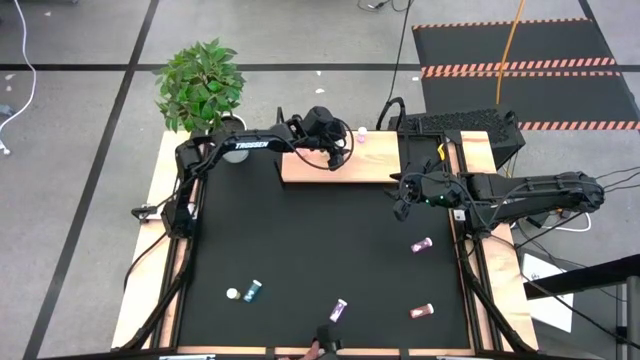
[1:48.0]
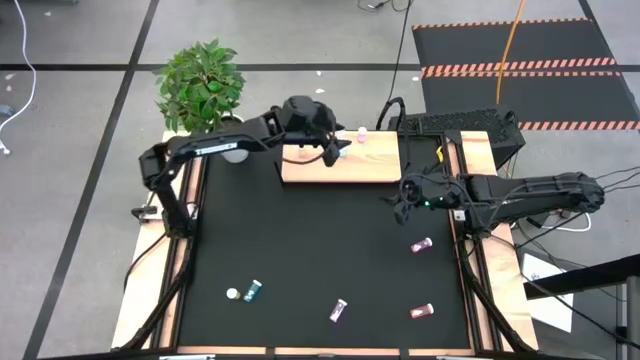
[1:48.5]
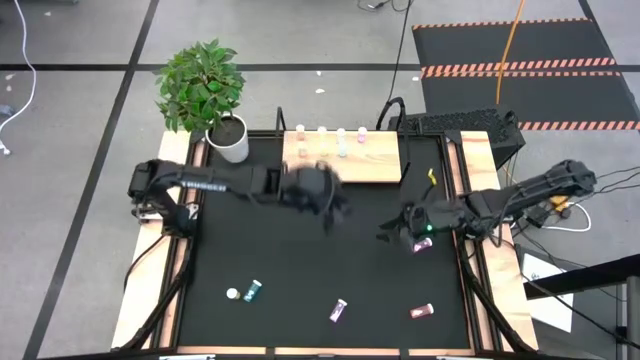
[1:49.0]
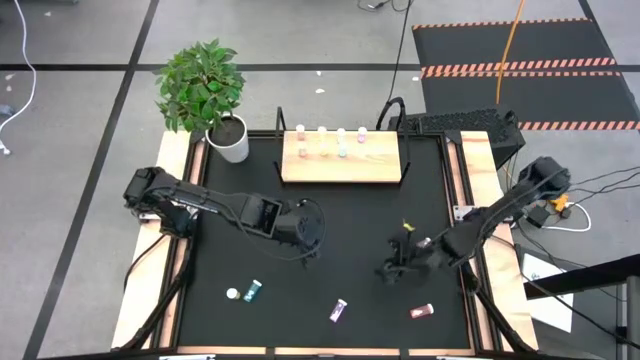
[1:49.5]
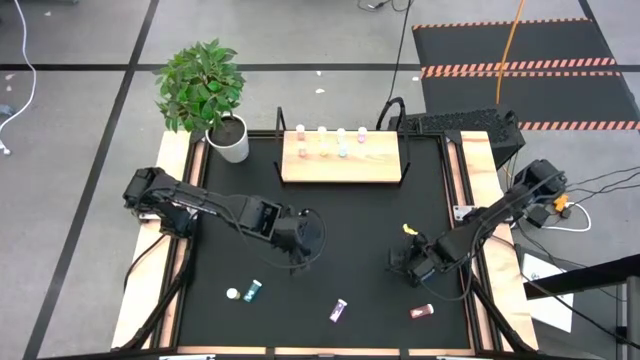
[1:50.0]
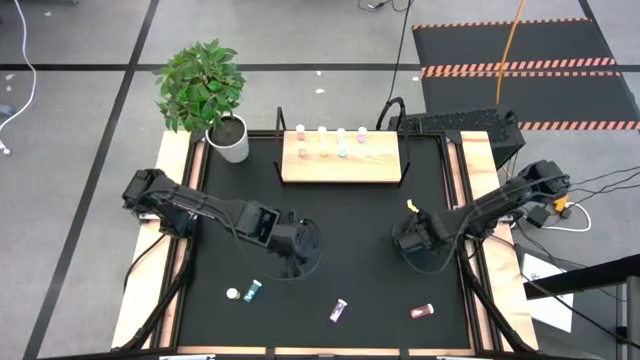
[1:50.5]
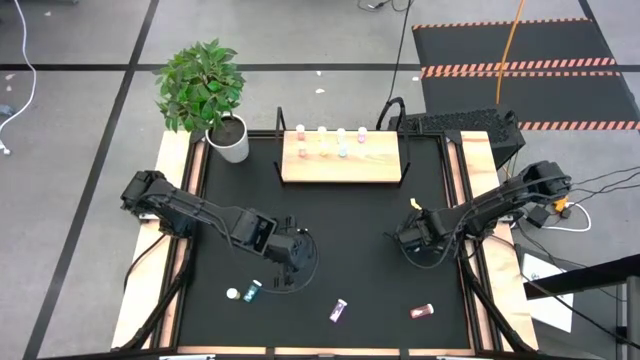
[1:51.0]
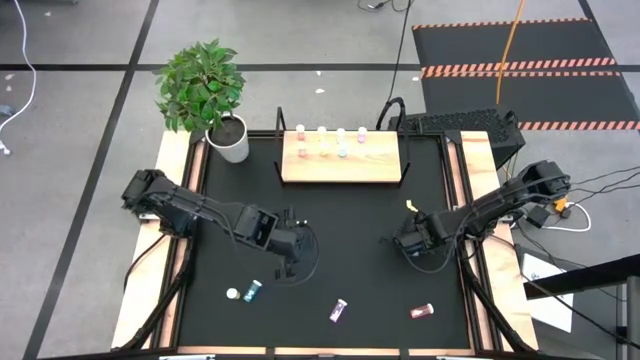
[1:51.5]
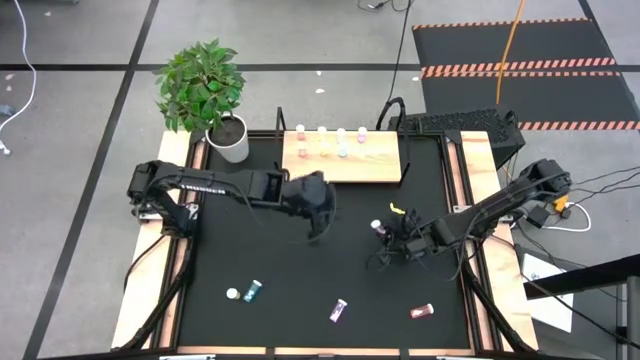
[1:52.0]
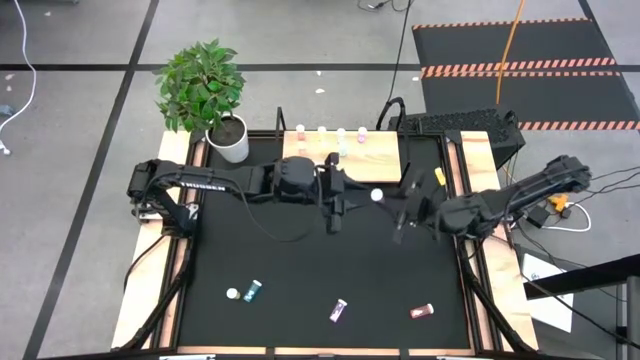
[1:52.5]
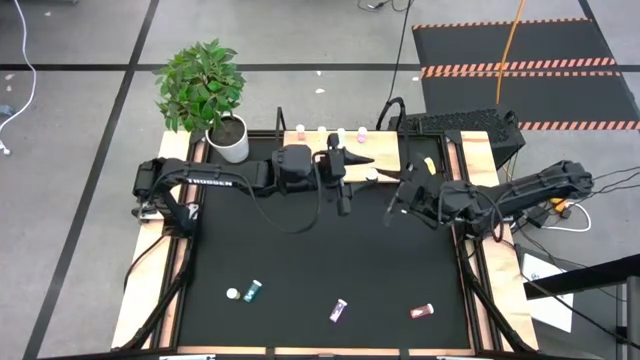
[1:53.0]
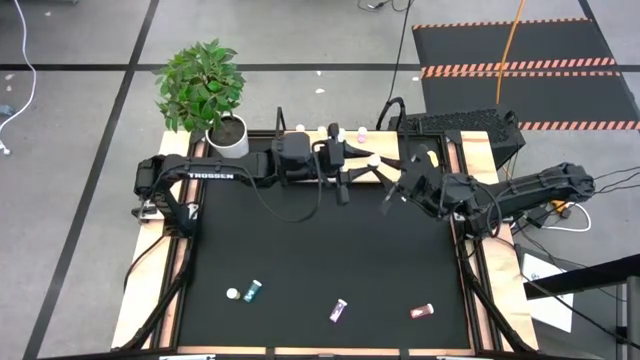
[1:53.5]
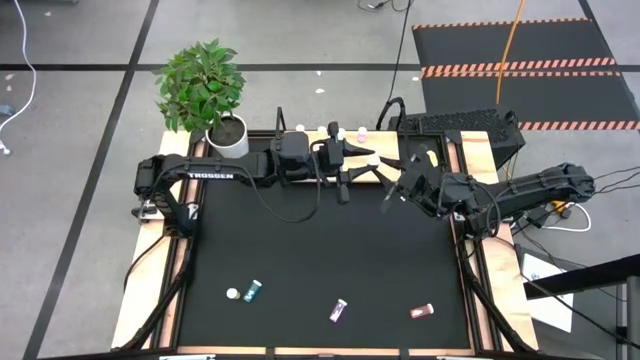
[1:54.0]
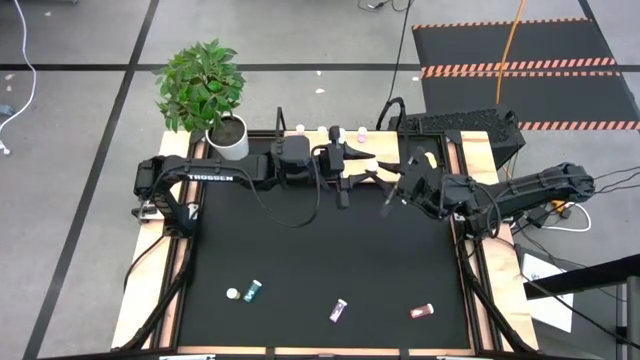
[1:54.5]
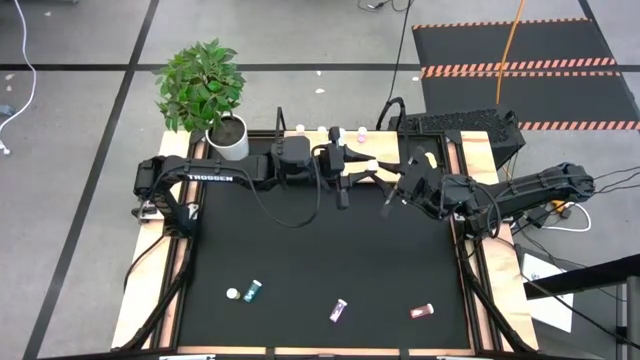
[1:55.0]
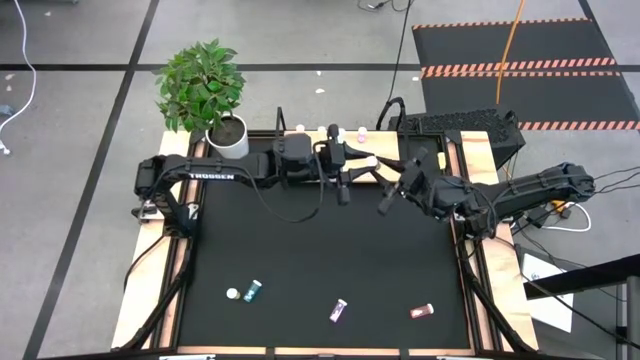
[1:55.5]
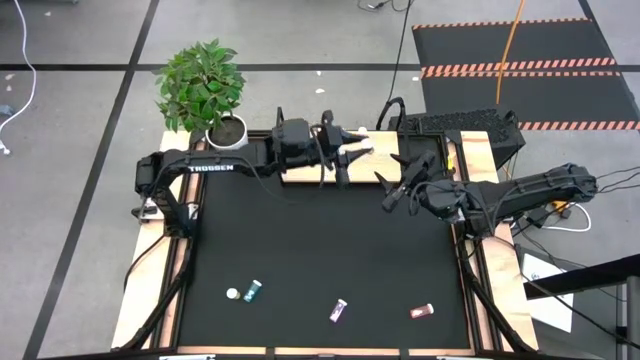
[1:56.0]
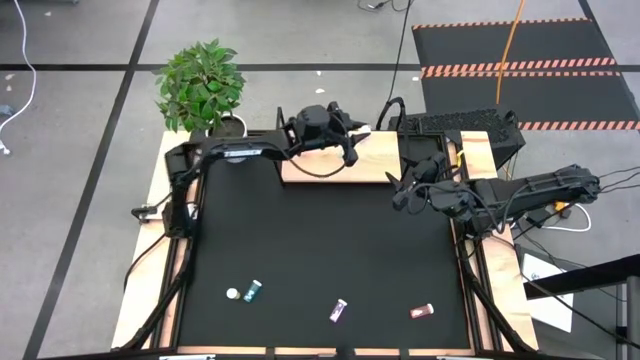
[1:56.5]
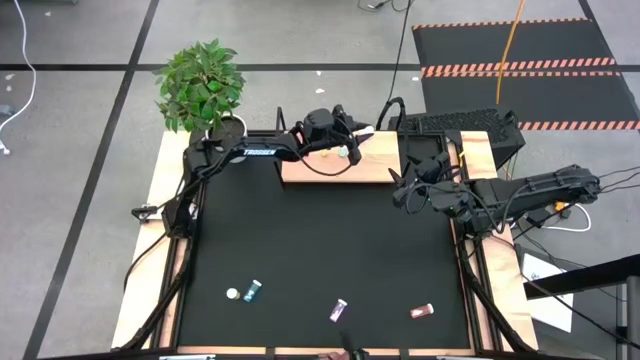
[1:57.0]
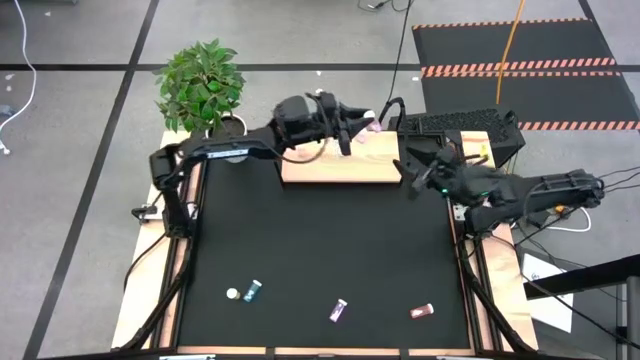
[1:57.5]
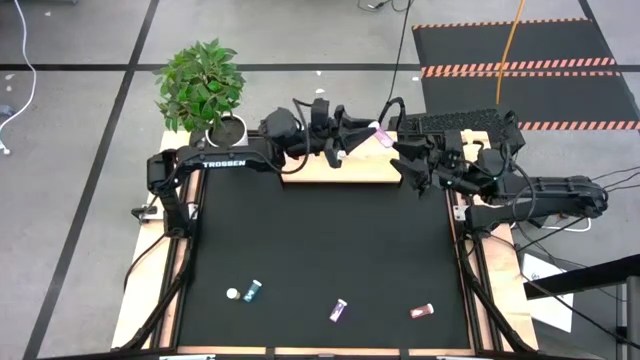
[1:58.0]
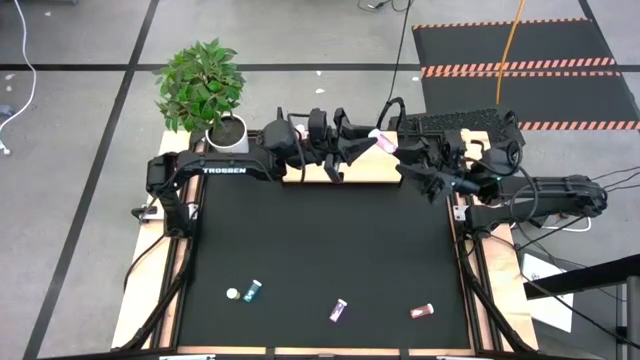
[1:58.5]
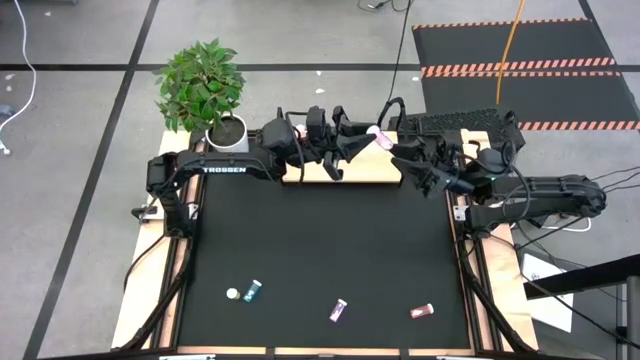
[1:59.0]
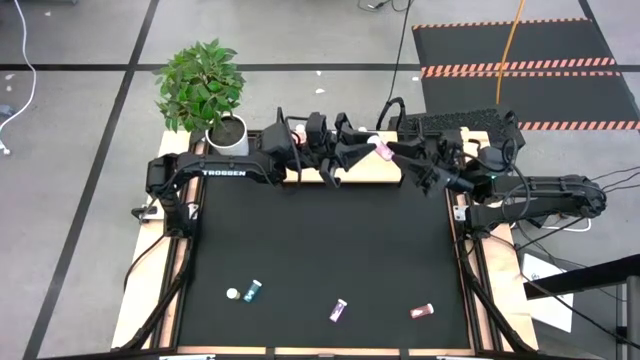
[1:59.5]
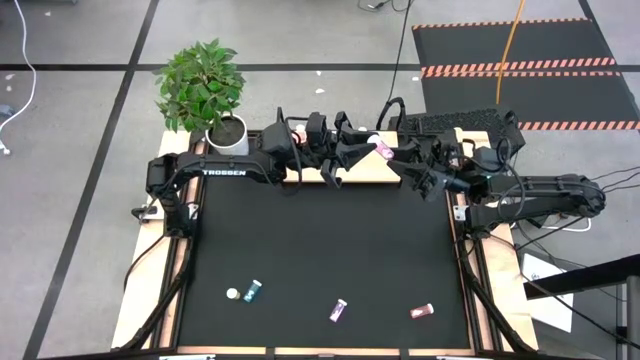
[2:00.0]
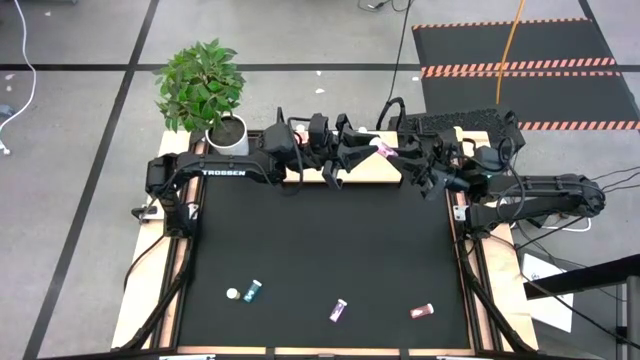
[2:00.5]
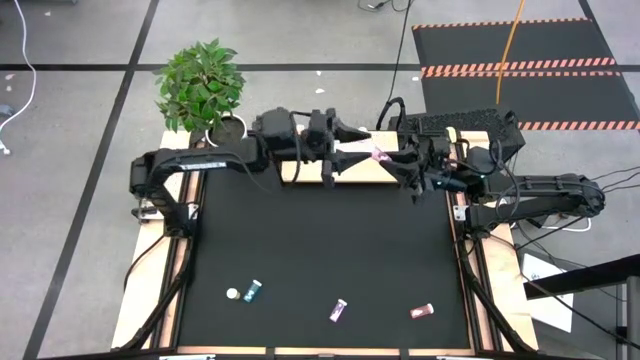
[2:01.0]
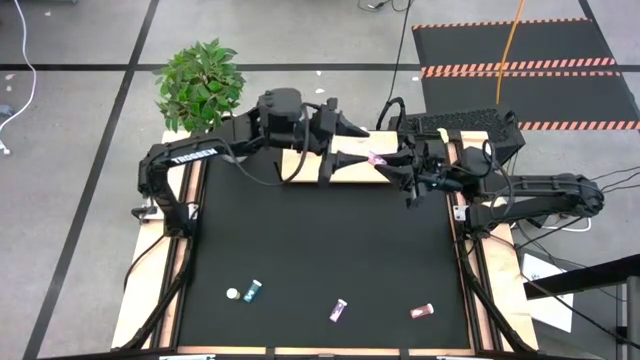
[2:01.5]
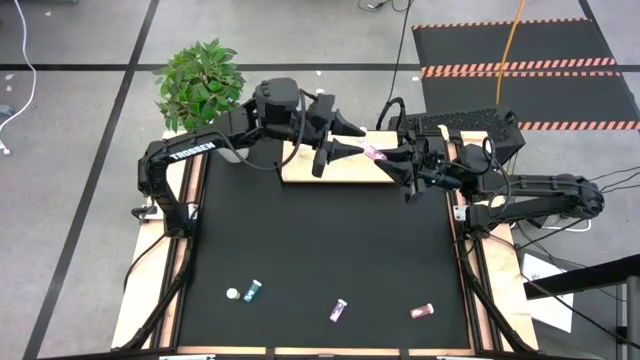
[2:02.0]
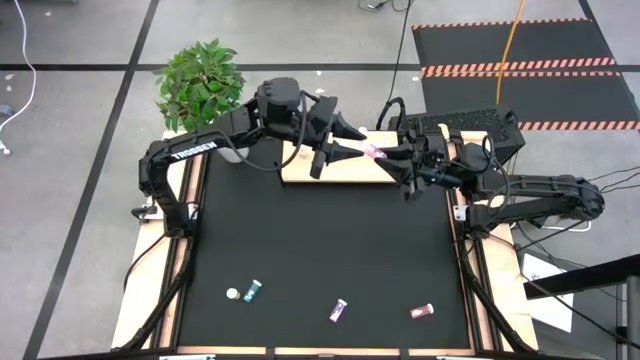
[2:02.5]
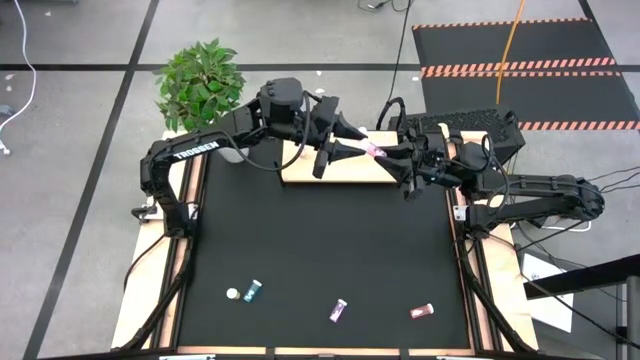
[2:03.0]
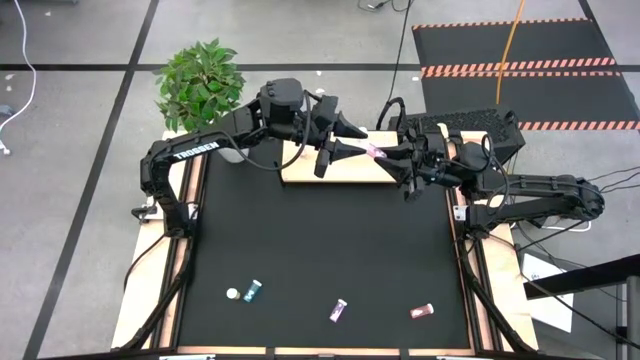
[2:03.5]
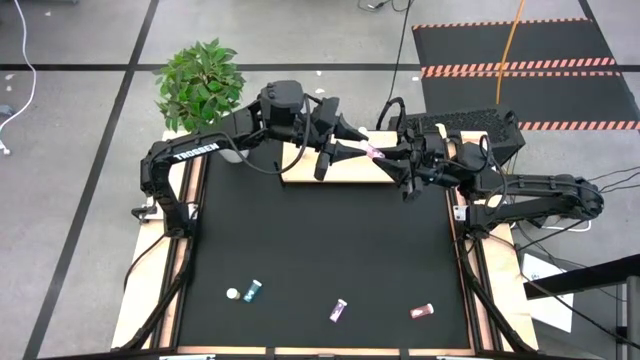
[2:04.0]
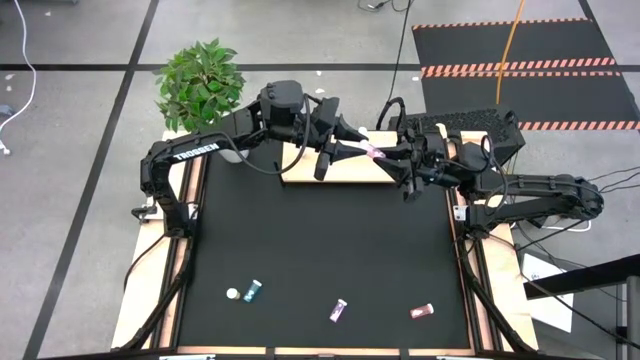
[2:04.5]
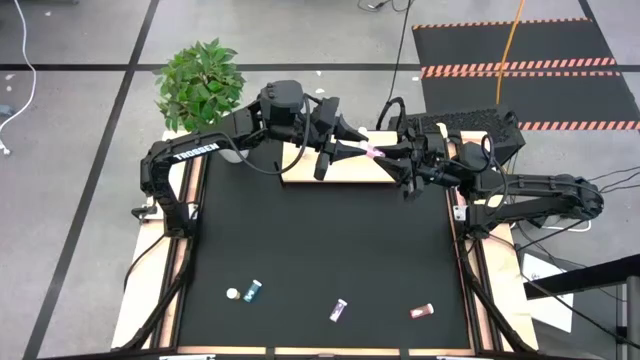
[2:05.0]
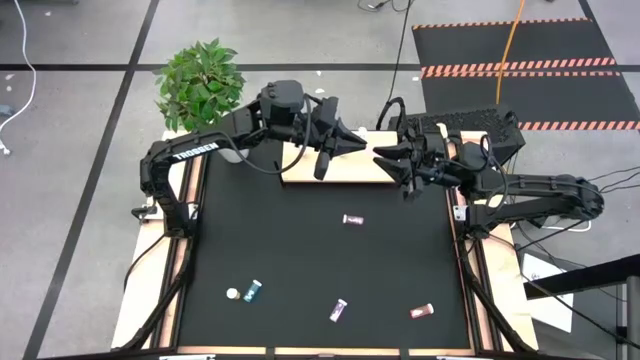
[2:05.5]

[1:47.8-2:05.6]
Task: Pick and place medicine bottles onto shelf by color
Put the right violet pill bottle on the shelf aligned with the other violet pill bottle

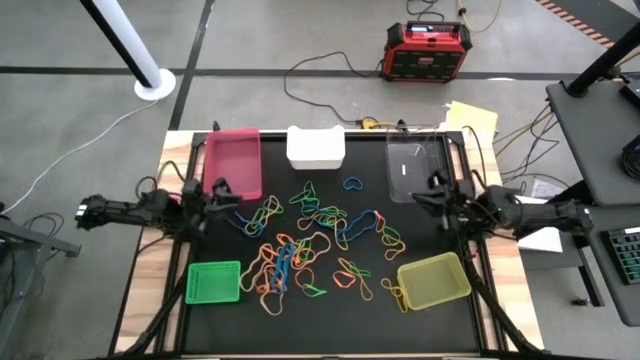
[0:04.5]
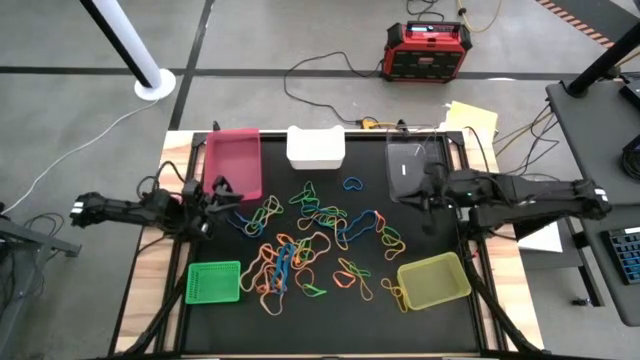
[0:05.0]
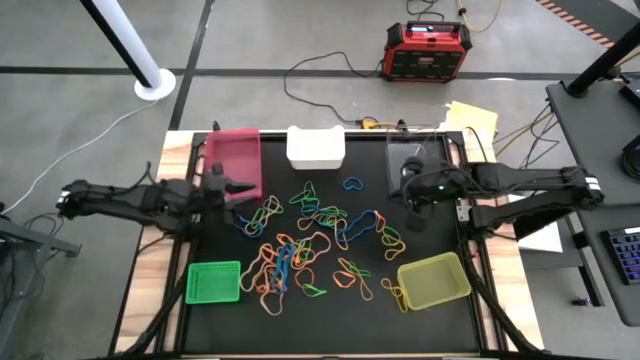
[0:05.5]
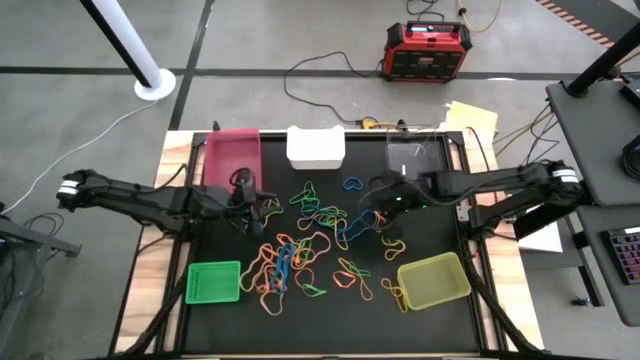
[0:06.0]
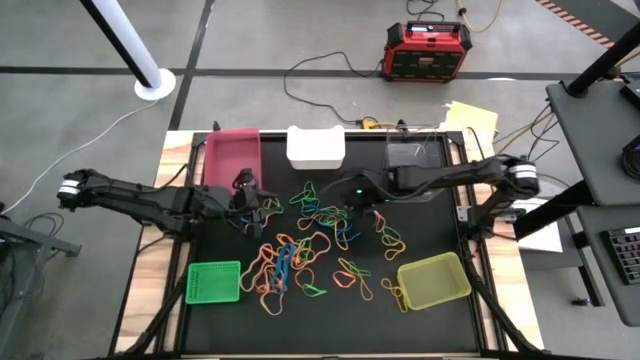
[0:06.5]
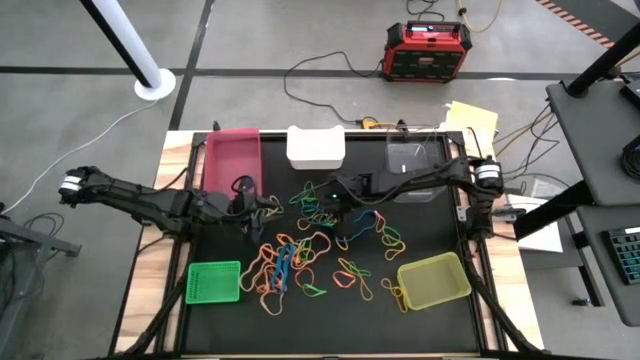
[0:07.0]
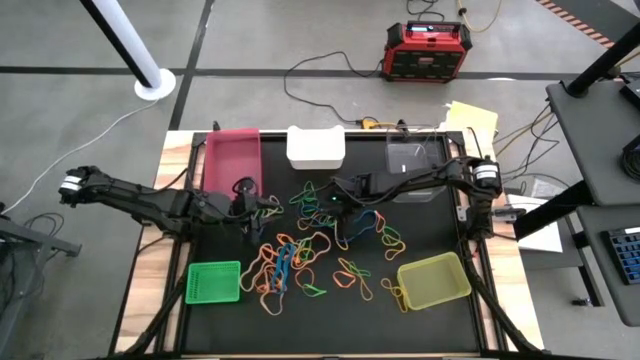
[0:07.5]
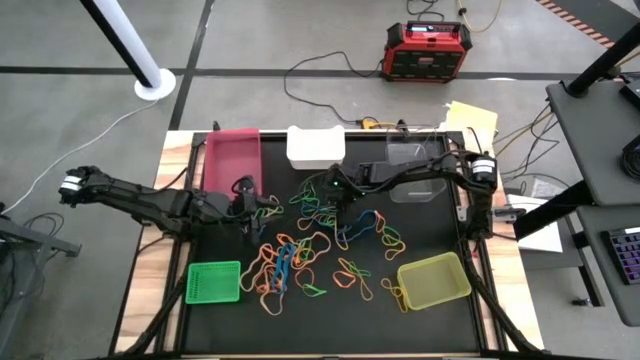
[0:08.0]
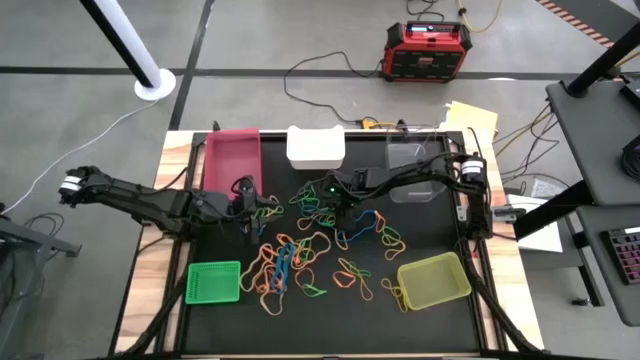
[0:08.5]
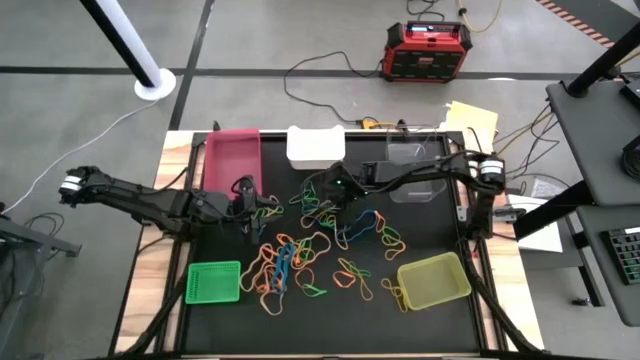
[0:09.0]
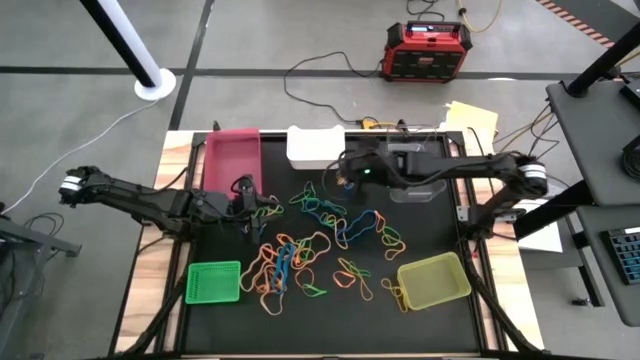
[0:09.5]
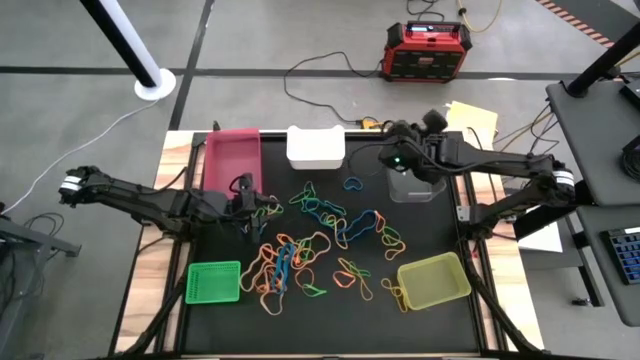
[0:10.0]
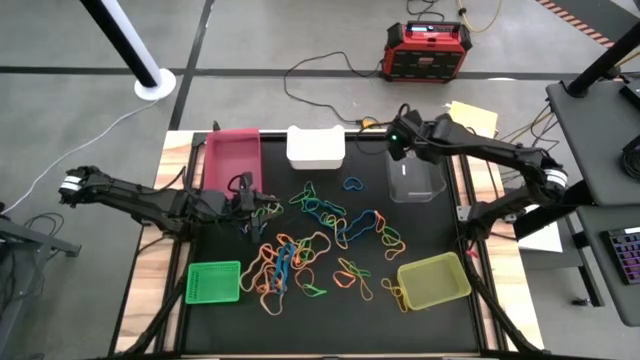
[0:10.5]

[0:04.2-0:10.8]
Task: Sort rubber bands into baskets
Put the yellow rubber band into the transparent bin
